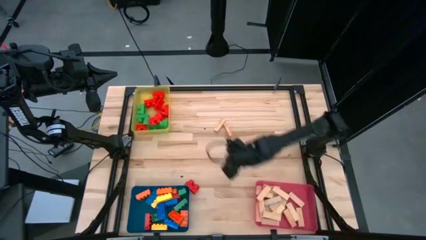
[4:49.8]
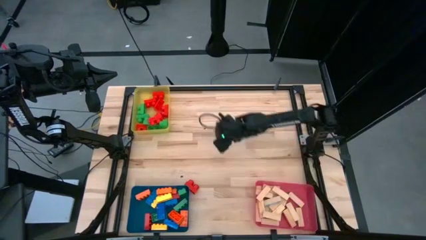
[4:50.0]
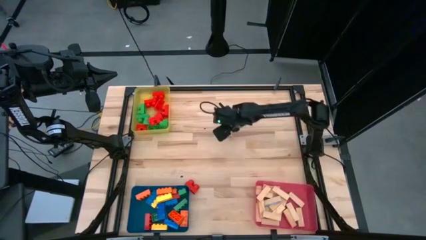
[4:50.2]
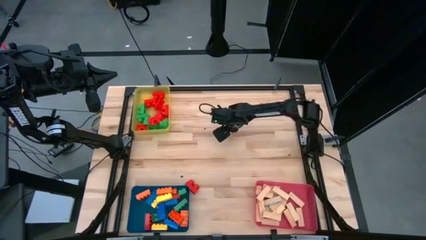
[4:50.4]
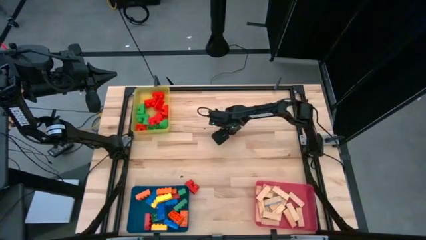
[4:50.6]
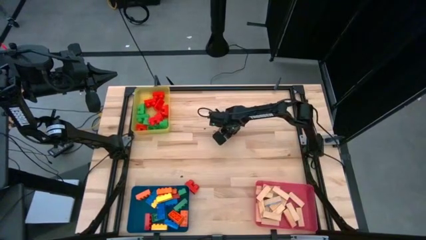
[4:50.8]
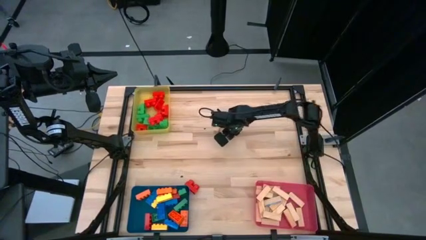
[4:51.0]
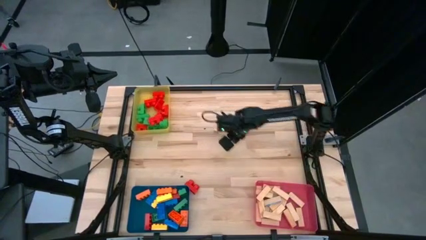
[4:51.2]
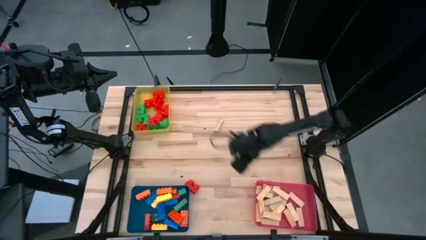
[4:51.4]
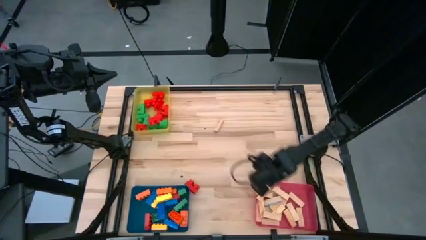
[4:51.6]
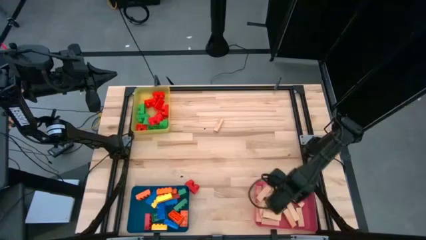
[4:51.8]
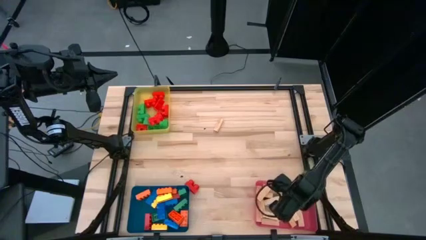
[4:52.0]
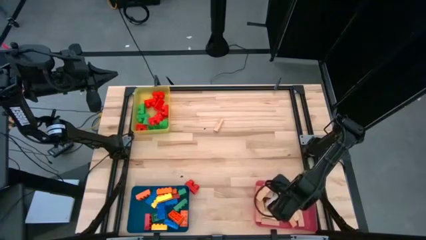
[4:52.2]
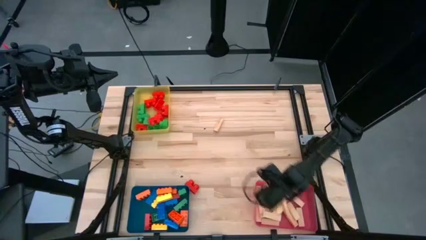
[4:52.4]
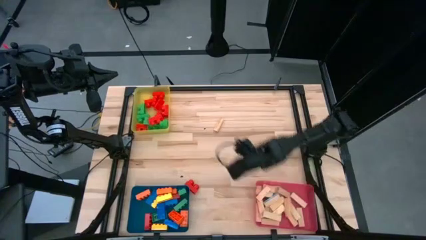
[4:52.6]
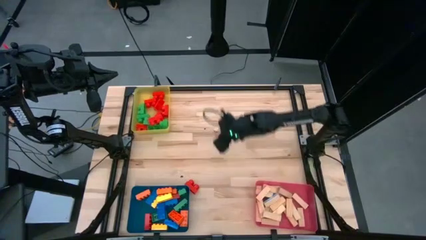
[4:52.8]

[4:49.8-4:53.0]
Task: Sort blocks by size
Put the wooden block into the red bin

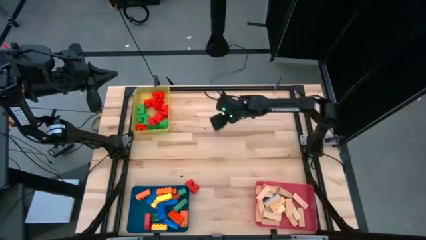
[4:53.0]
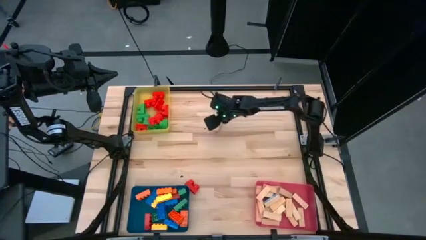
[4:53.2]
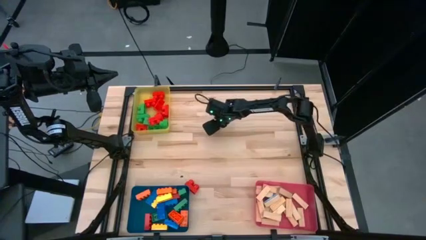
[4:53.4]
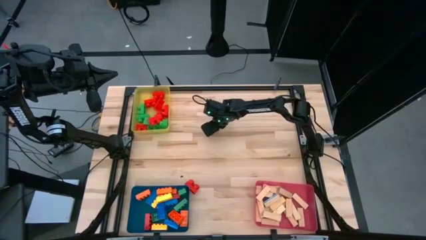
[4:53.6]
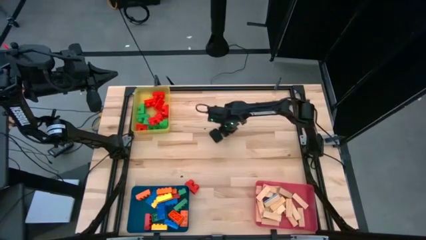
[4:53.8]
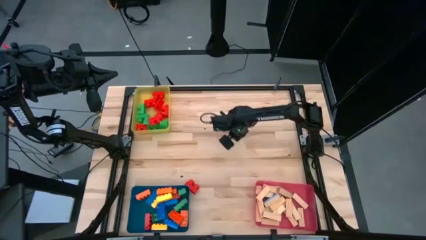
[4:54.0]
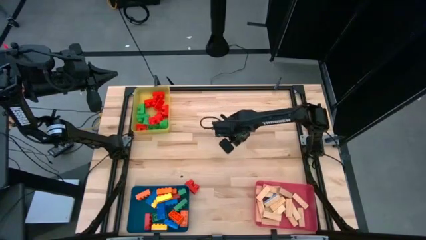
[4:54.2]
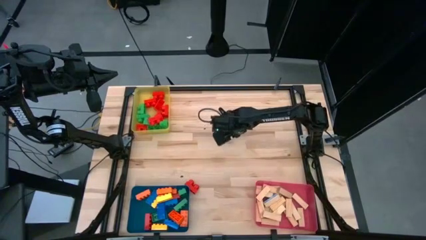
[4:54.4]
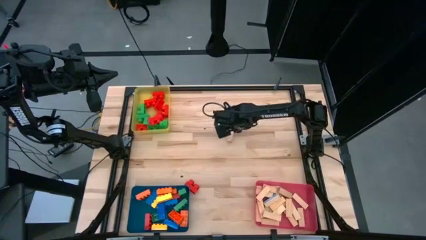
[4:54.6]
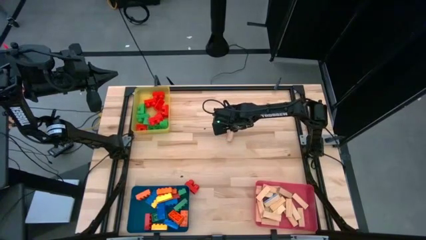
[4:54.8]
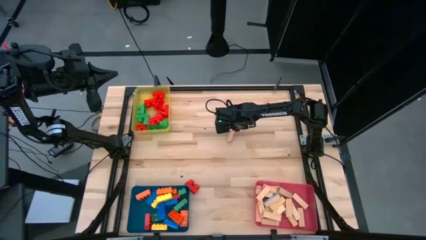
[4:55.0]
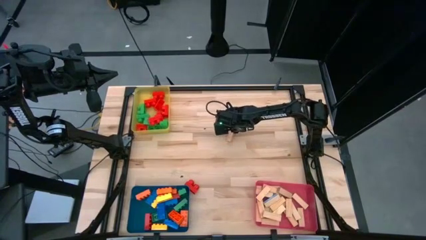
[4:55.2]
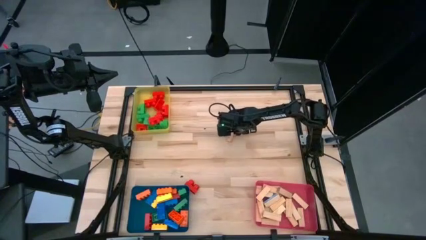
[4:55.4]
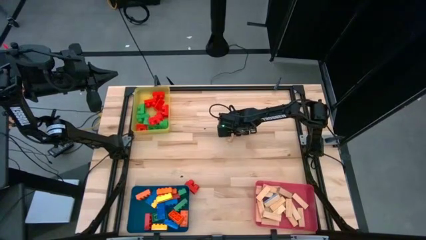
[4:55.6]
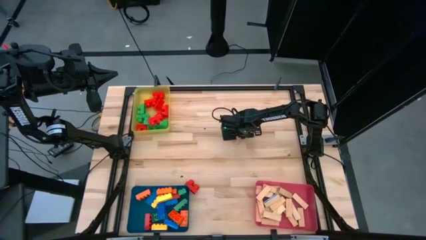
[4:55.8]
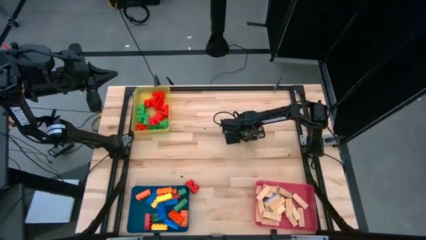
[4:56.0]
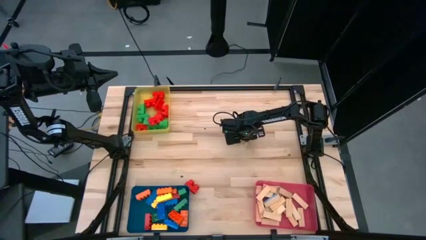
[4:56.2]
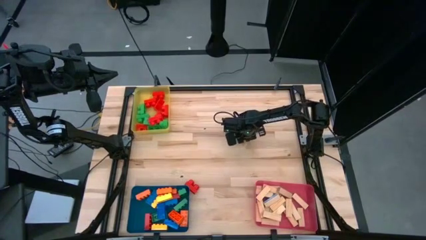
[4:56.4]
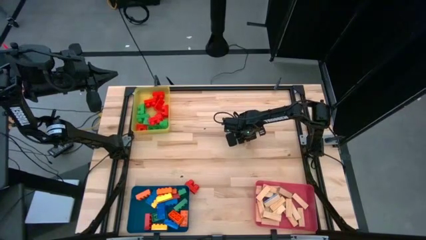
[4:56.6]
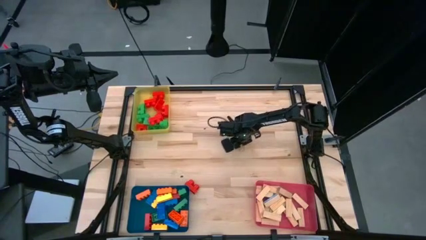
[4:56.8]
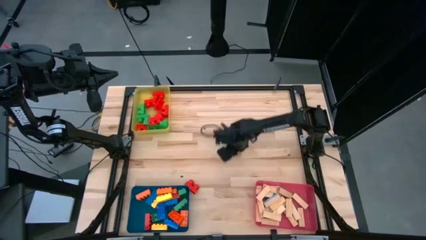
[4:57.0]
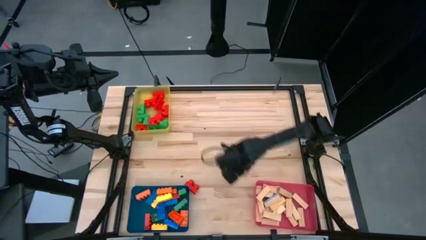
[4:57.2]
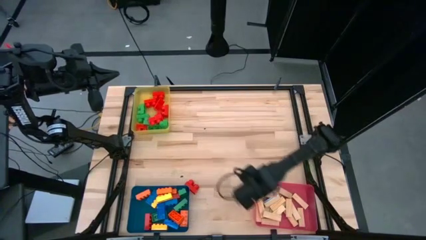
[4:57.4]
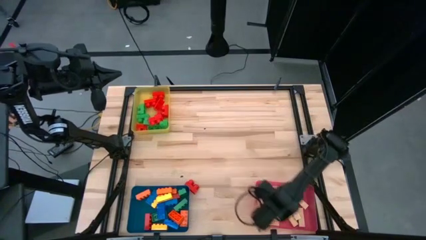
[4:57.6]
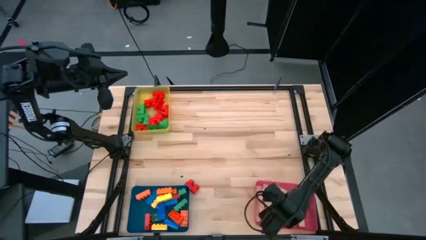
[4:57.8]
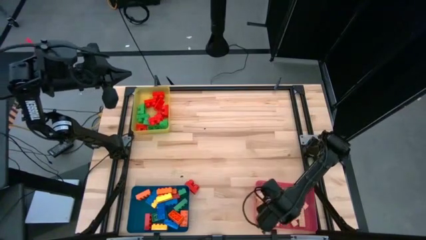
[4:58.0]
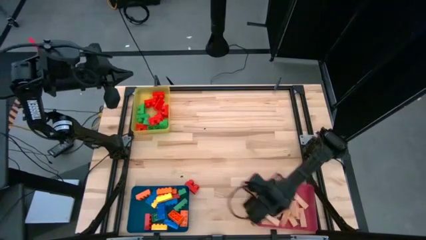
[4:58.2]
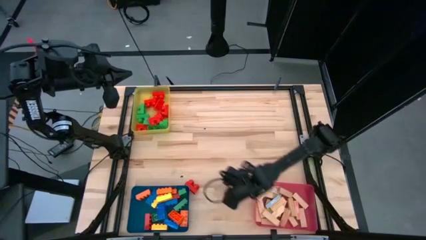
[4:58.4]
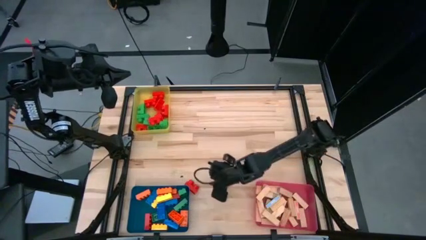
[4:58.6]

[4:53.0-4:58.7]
Put the wooden game piece into the red bin

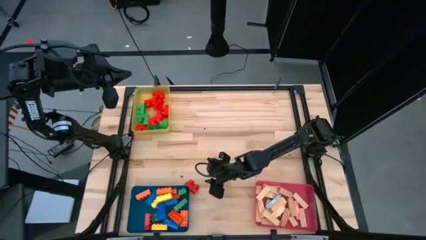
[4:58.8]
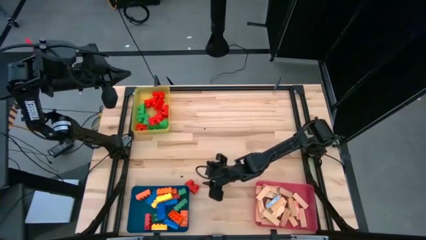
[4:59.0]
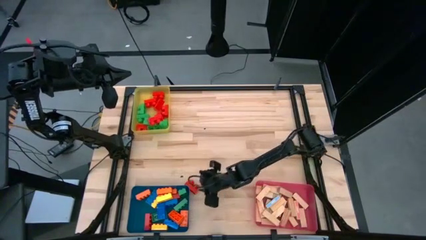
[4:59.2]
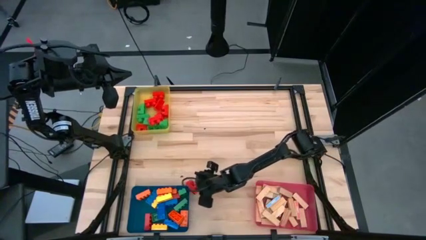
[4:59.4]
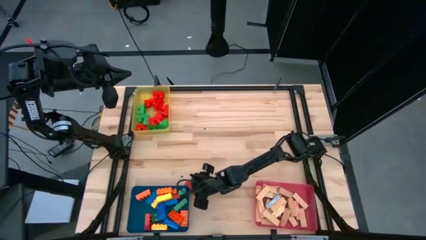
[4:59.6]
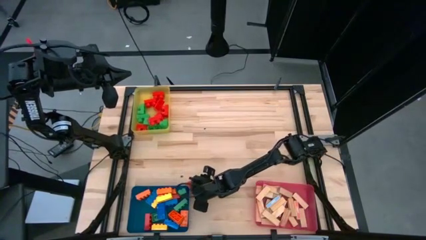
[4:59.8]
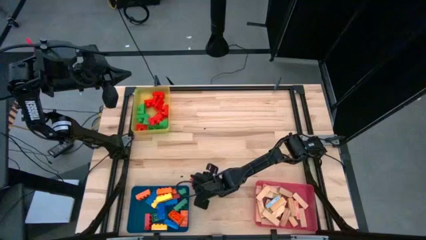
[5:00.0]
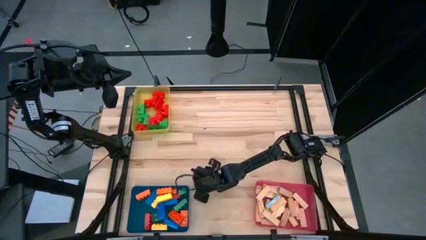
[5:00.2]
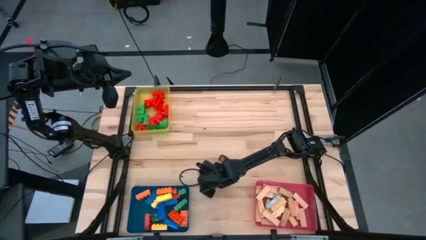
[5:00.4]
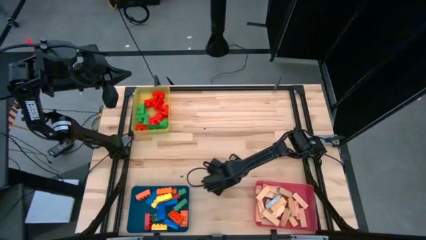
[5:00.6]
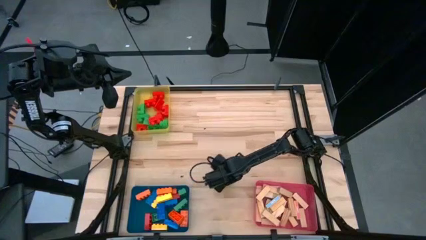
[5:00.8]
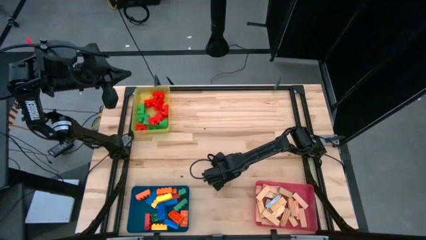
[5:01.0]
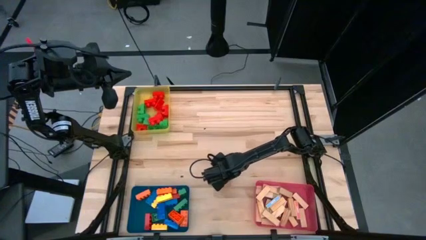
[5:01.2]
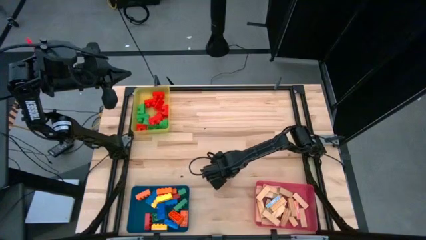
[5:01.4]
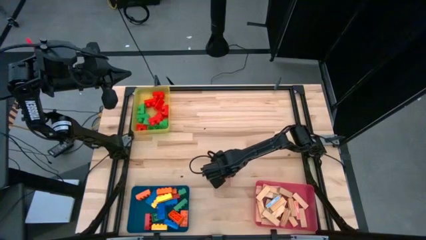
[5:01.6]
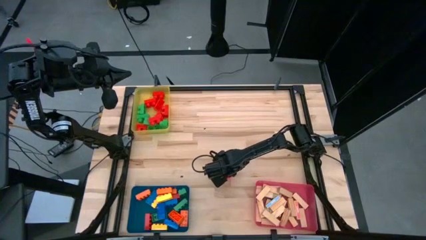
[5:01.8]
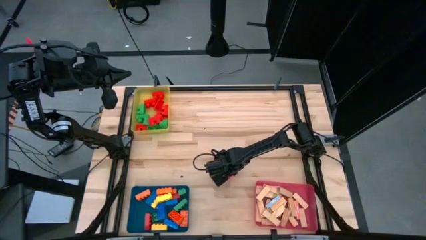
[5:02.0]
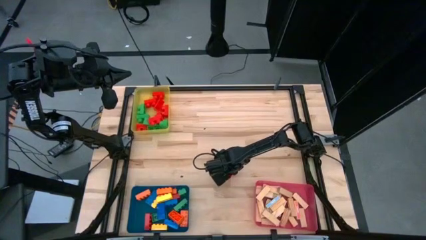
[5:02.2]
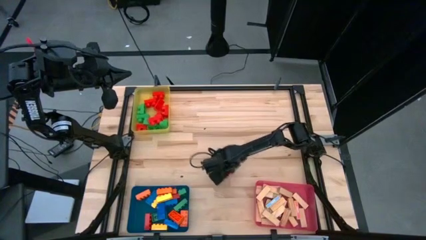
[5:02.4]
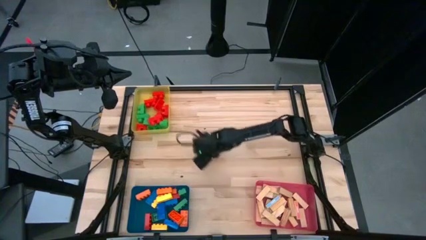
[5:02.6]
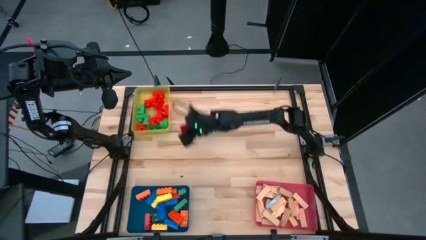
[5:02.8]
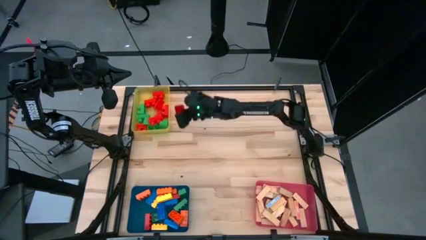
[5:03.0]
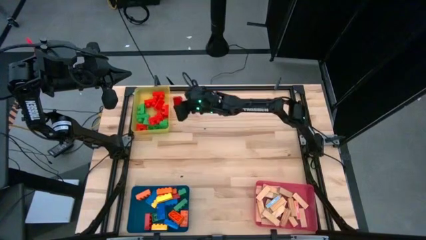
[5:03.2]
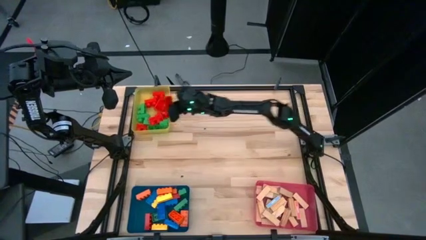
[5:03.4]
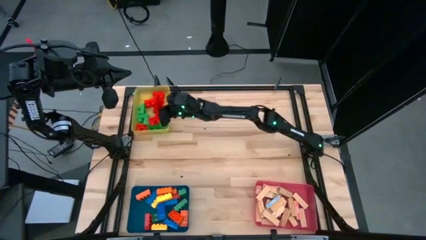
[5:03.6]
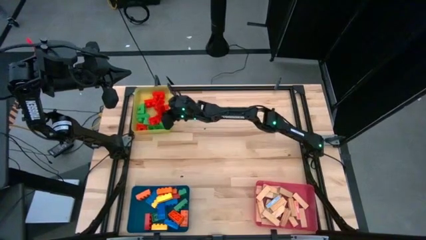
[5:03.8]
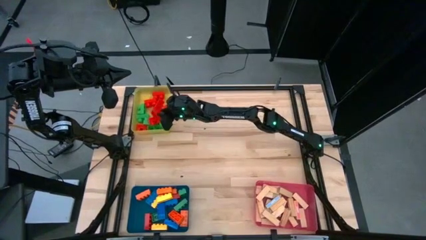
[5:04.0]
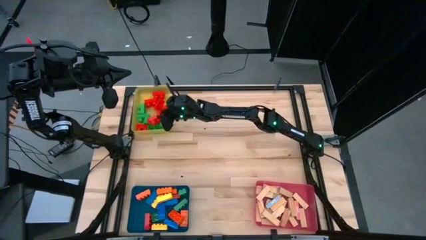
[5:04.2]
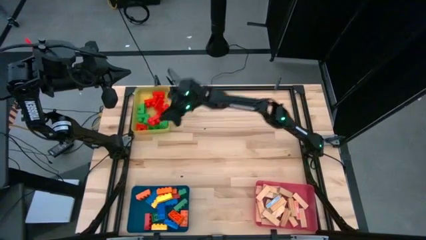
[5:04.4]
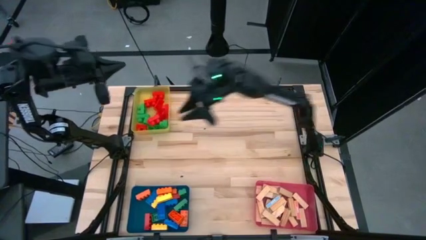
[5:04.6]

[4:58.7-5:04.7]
Put the round orange game piece into the yellow bin
